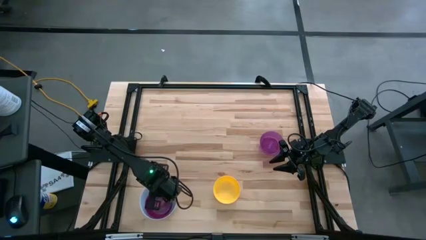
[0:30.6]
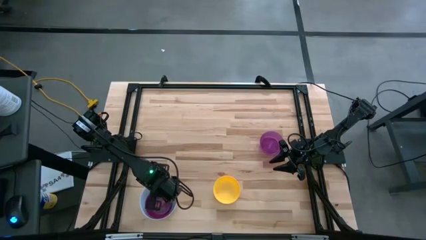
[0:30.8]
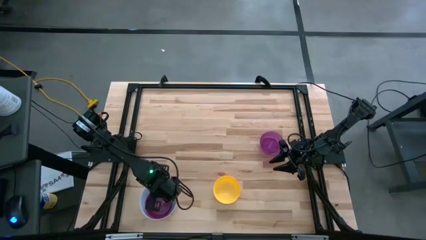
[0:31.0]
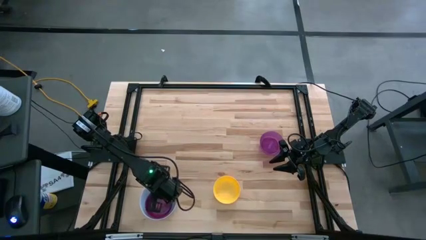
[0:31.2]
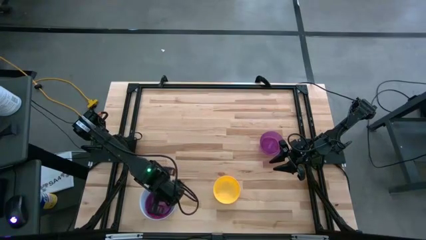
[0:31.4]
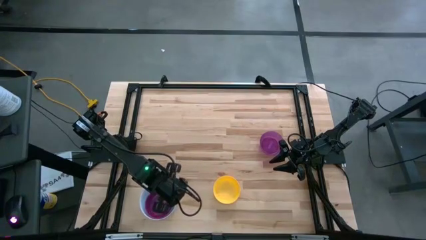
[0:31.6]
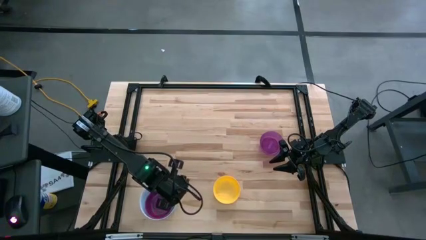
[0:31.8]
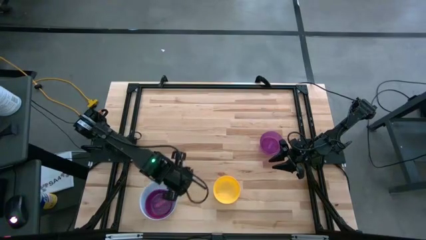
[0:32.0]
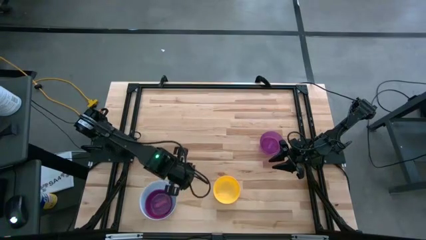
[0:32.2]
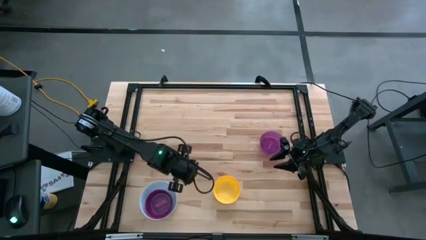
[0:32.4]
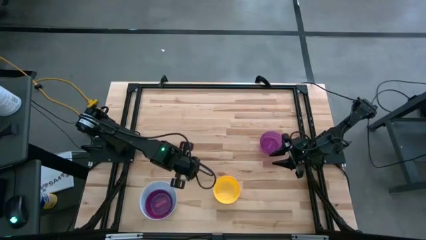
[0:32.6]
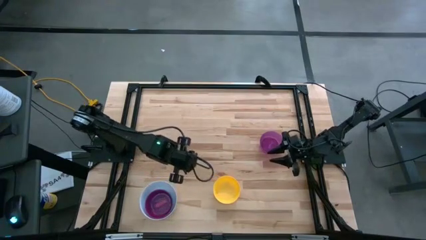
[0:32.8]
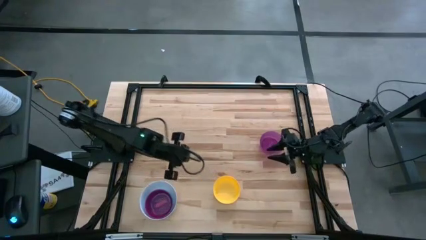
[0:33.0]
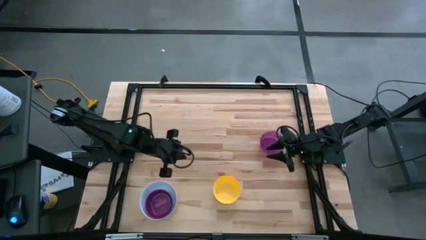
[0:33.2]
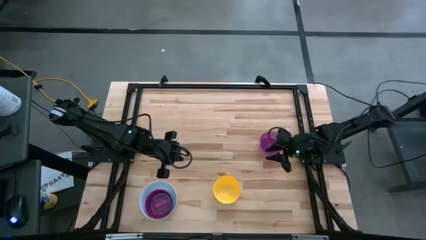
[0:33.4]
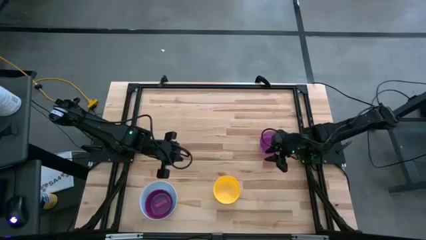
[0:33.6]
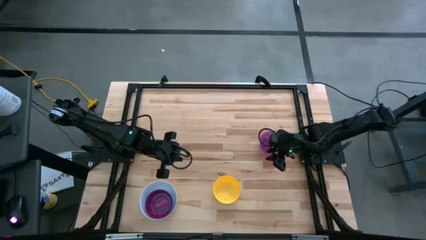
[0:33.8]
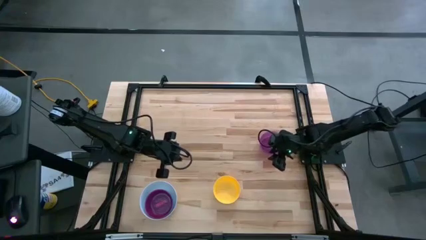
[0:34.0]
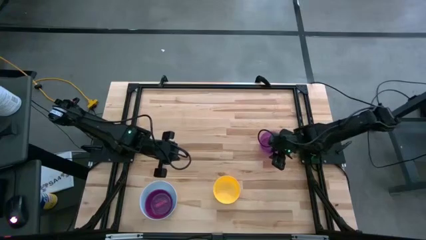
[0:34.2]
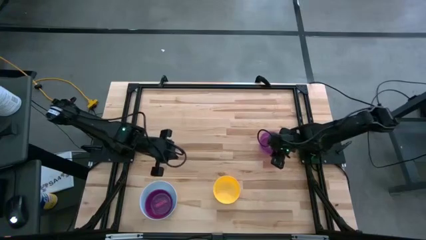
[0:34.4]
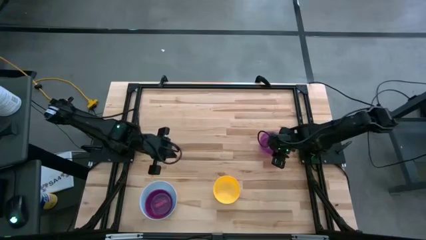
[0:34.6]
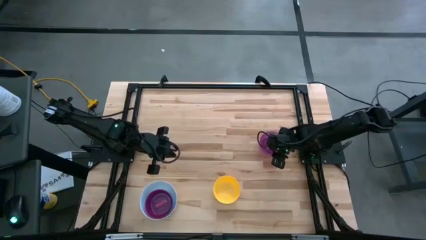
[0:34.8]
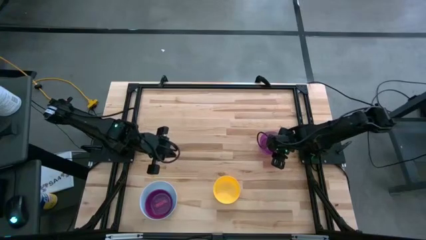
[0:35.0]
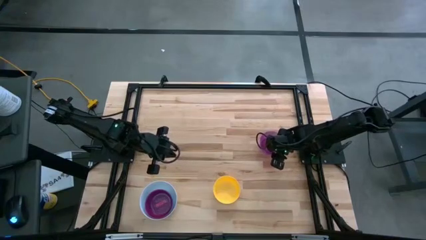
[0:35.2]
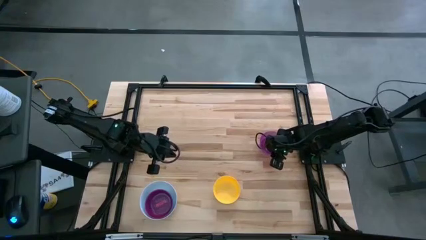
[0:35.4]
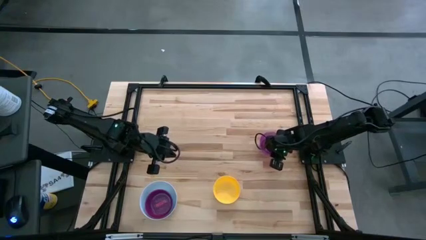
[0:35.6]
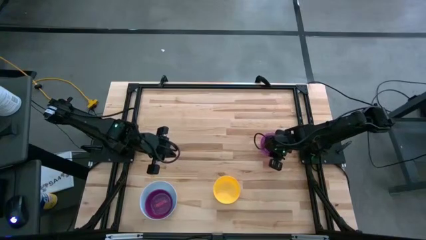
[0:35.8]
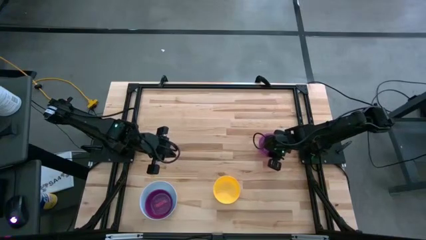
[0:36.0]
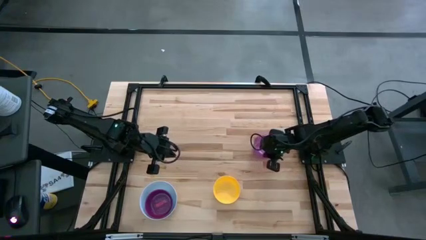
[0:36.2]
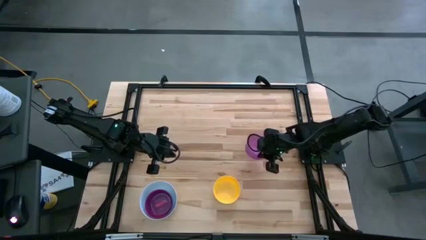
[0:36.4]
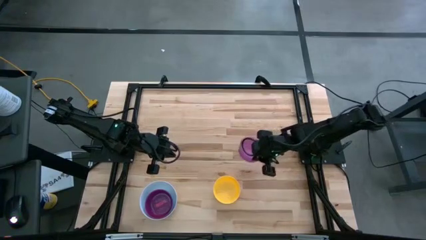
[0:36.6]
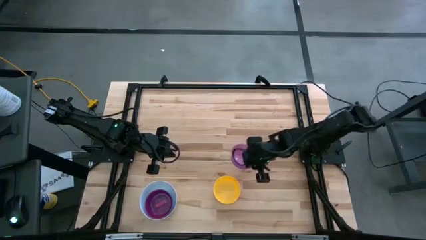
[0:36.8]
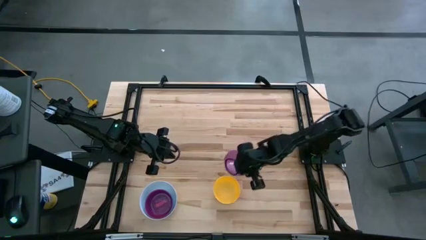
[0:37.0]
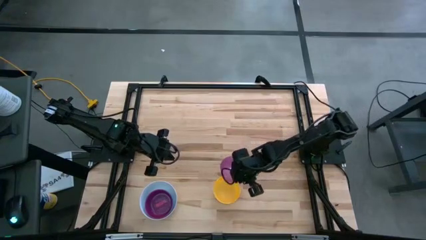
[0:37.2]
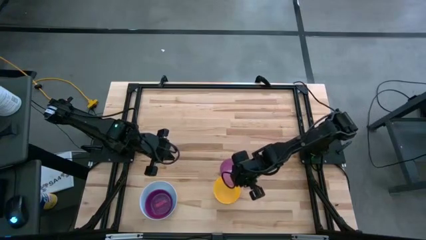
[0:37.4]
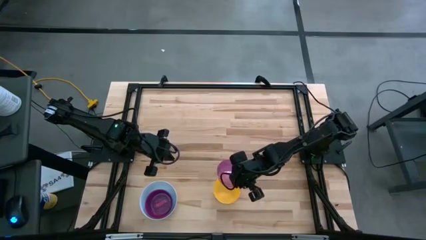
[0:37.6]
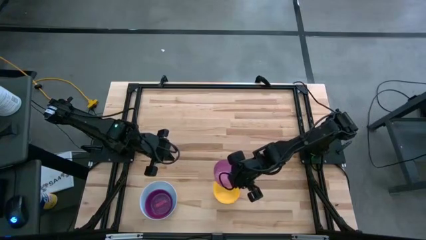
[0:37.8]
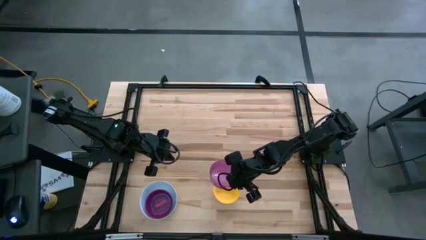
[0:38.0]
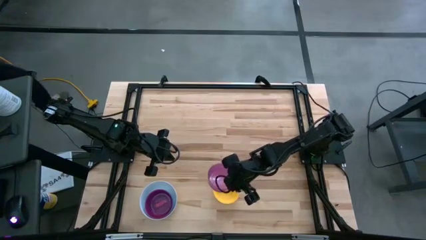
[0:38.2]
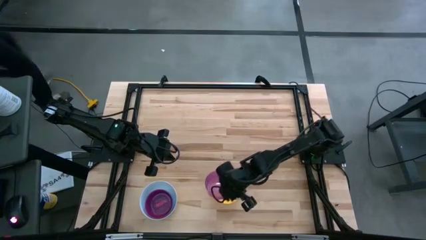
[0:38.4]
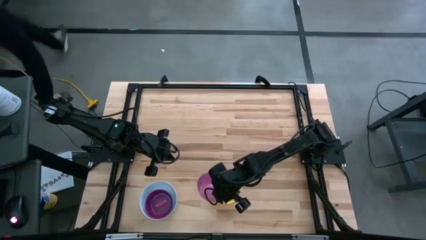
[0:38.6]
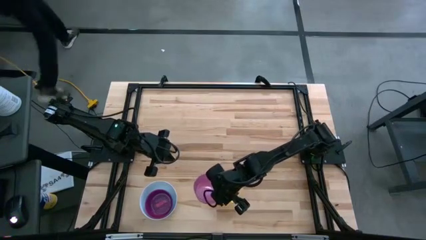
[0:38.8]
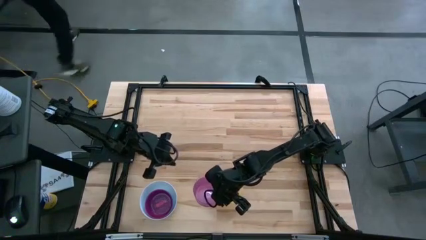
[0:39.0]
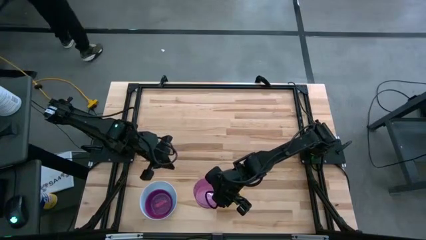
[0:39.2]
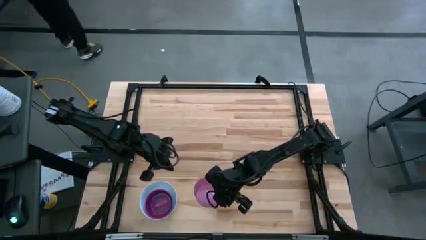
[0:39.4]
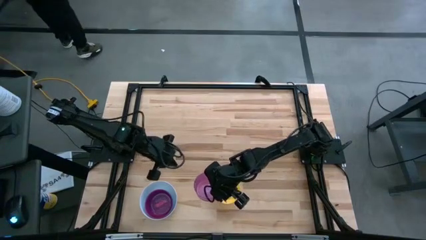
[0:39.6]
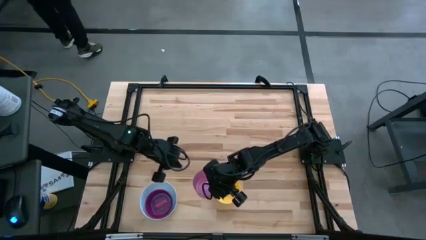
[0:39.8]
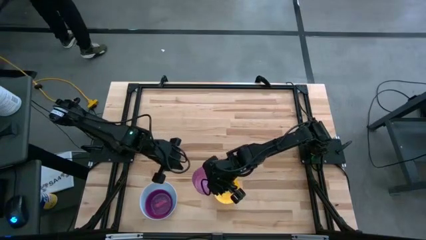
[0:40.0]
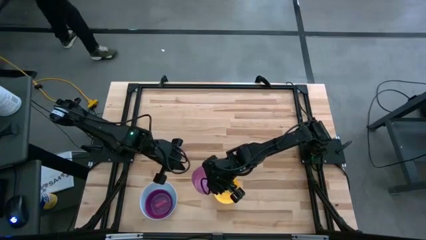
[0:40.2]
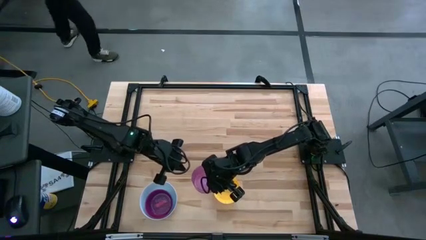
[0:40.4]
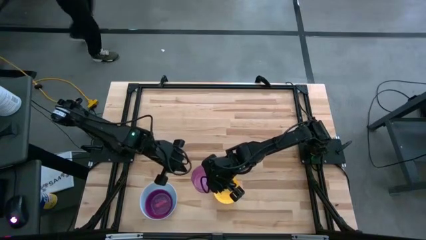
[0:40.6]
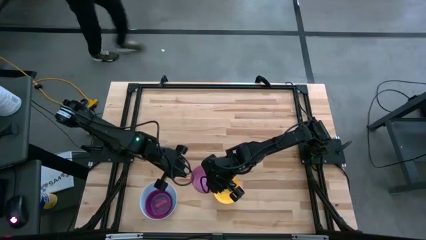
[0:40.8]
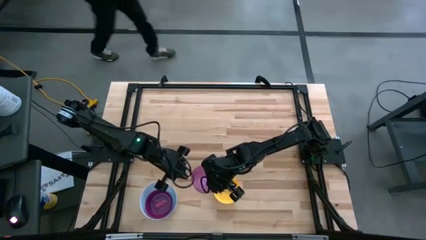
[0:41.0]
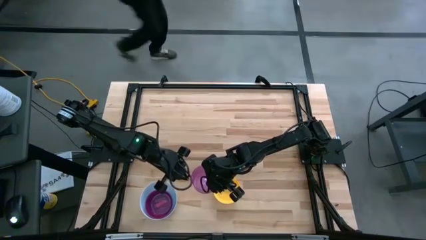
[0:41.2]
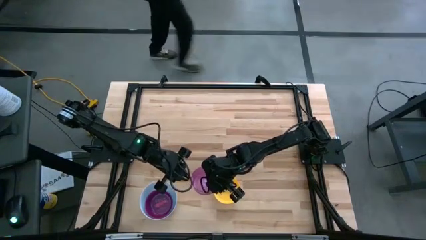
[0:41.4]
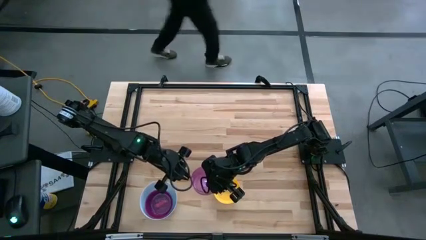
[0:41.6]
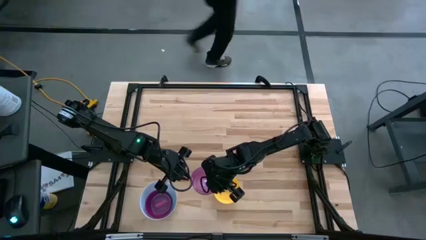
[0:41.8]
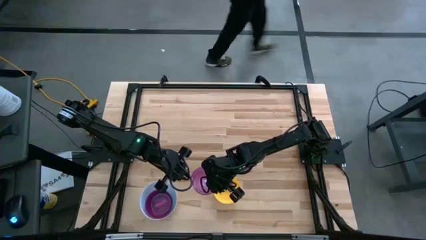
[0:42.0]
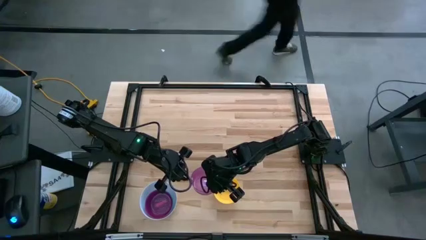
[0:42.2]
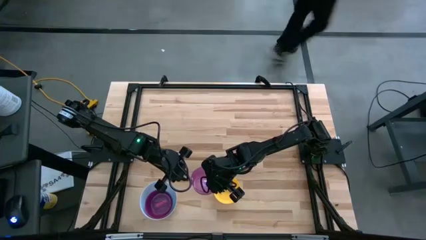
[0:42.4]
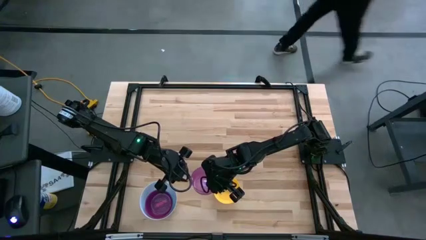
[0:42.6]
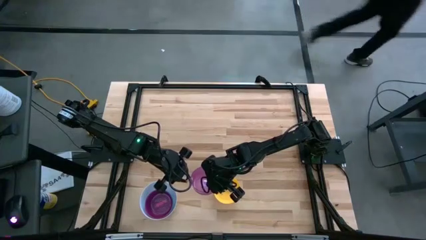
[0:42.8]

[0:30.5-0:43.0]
Stack the purple bowl on the pink bowl
